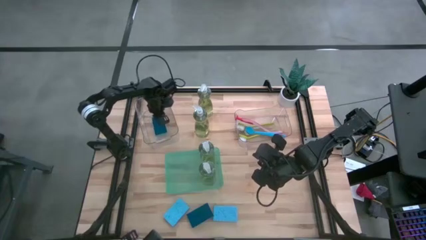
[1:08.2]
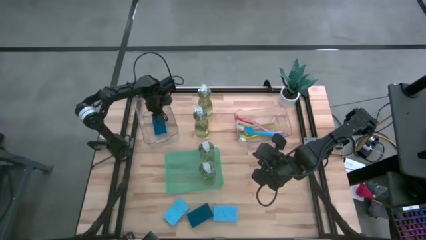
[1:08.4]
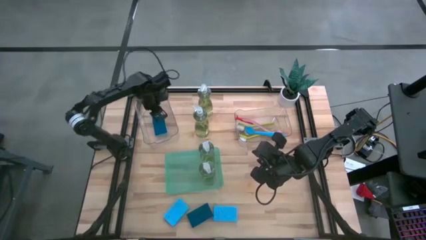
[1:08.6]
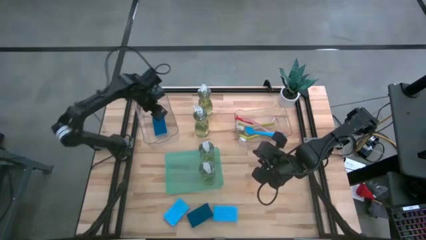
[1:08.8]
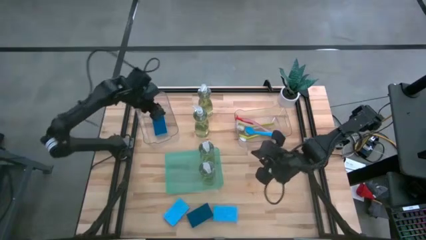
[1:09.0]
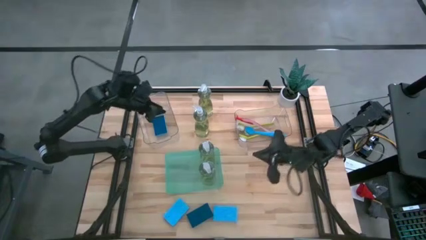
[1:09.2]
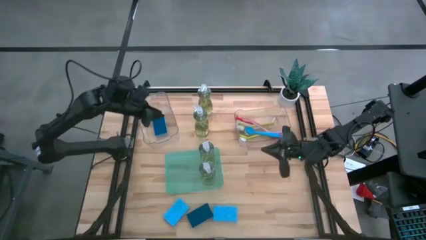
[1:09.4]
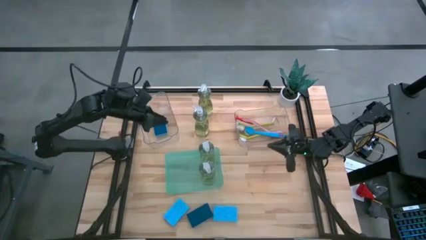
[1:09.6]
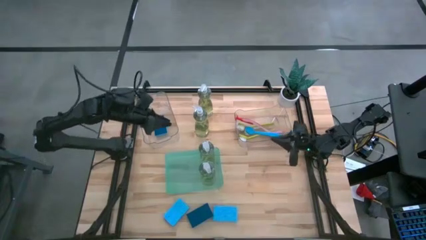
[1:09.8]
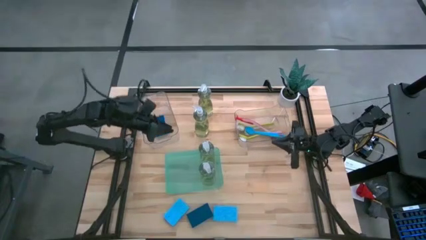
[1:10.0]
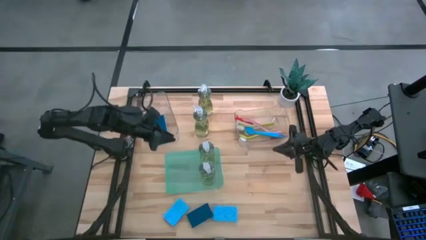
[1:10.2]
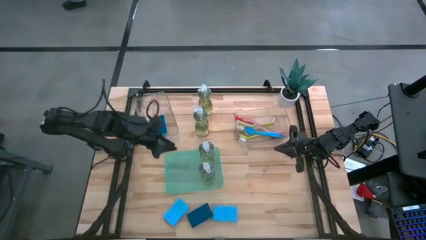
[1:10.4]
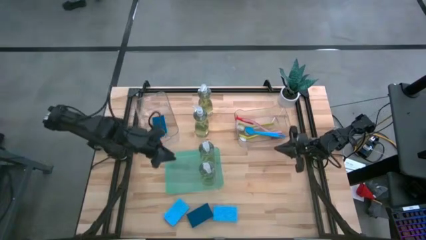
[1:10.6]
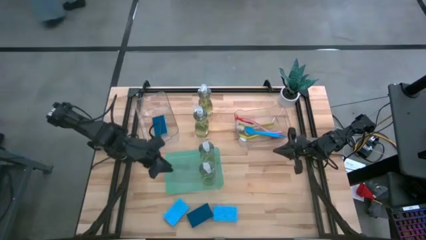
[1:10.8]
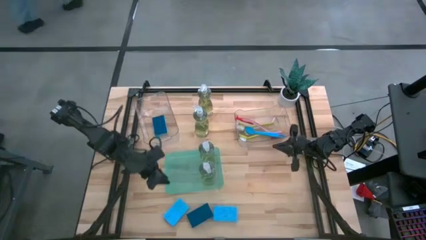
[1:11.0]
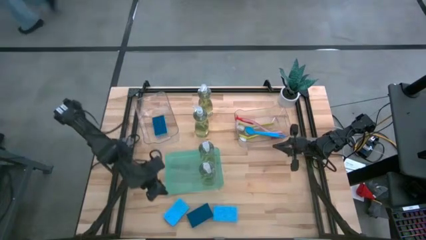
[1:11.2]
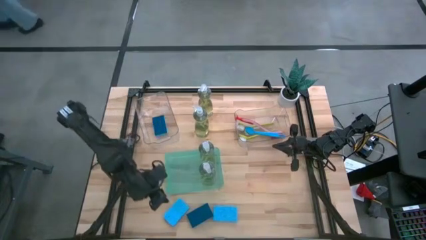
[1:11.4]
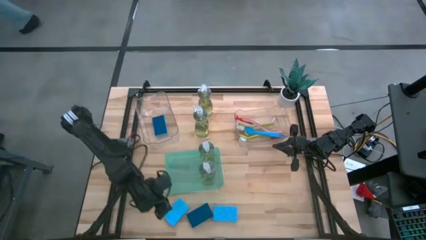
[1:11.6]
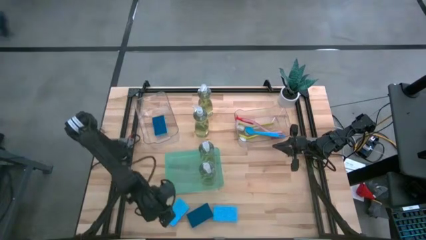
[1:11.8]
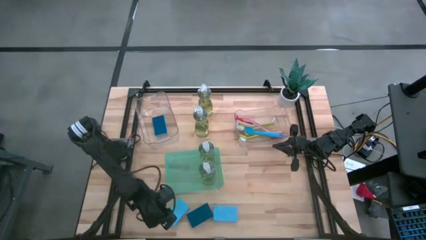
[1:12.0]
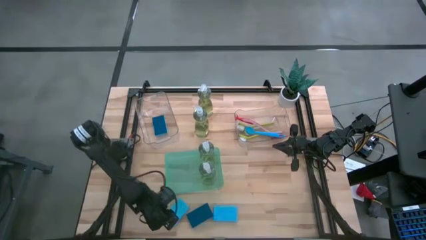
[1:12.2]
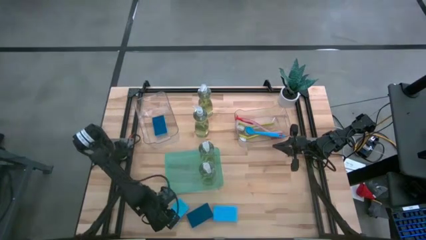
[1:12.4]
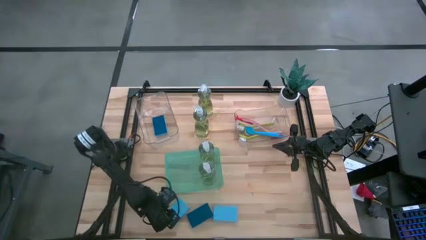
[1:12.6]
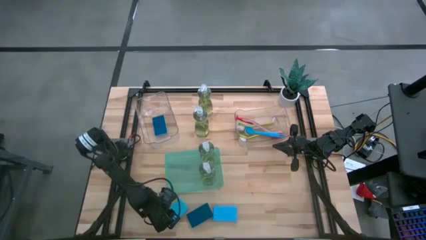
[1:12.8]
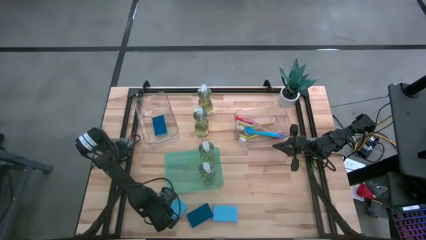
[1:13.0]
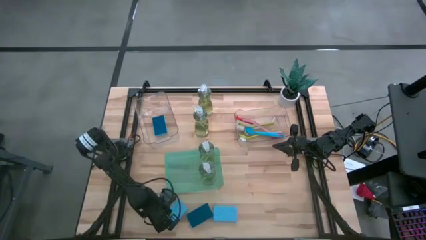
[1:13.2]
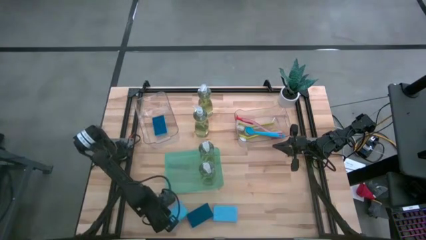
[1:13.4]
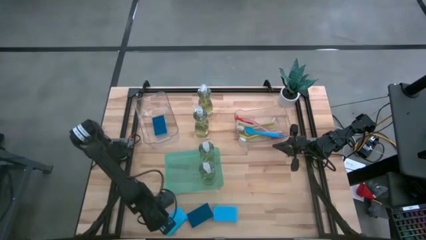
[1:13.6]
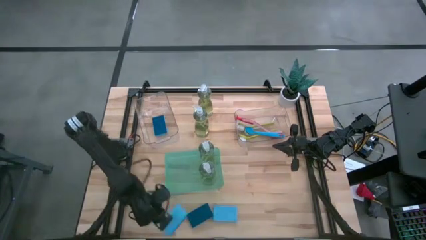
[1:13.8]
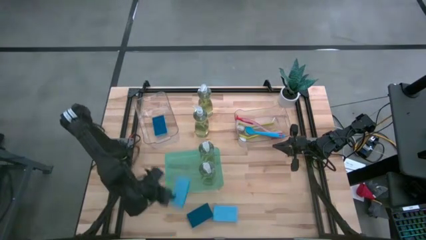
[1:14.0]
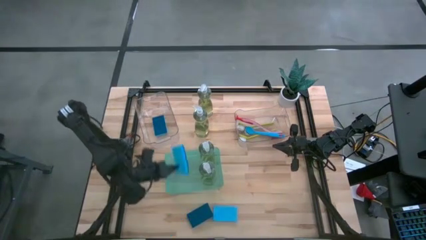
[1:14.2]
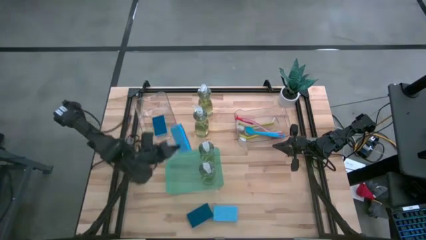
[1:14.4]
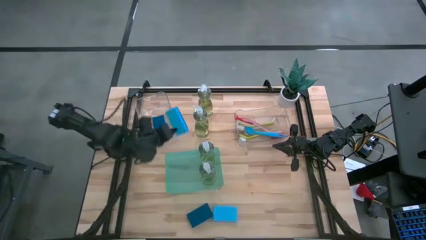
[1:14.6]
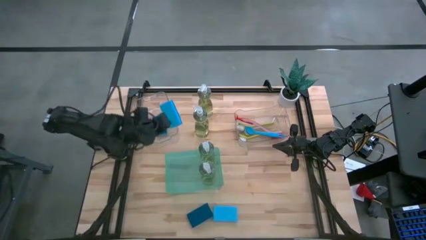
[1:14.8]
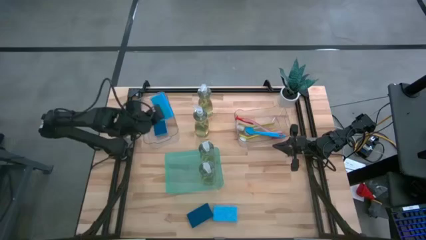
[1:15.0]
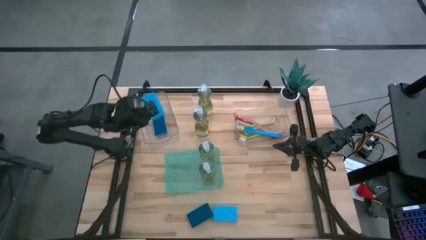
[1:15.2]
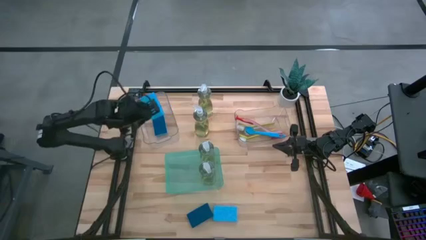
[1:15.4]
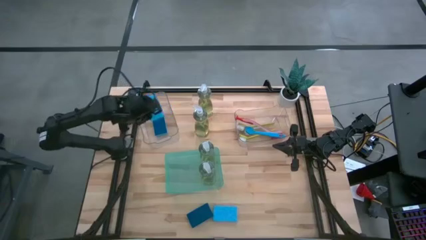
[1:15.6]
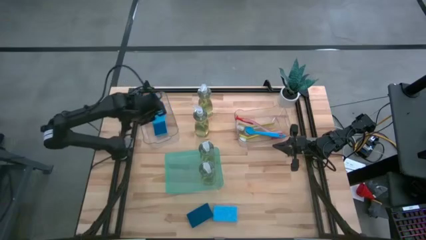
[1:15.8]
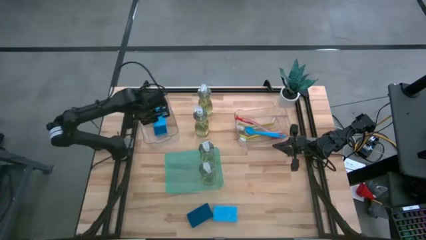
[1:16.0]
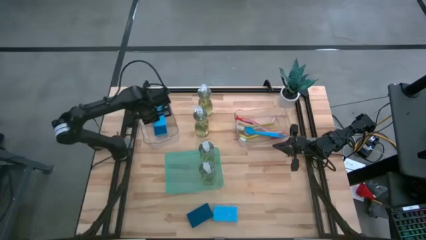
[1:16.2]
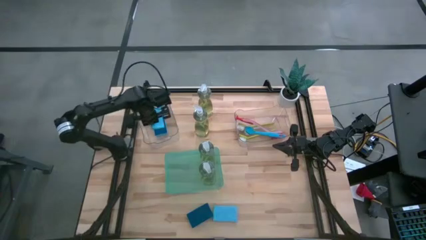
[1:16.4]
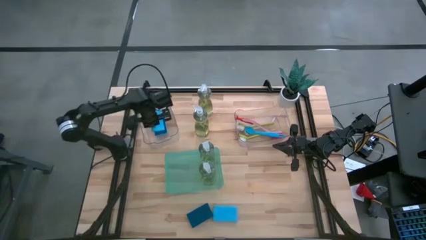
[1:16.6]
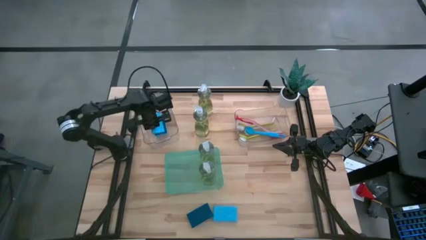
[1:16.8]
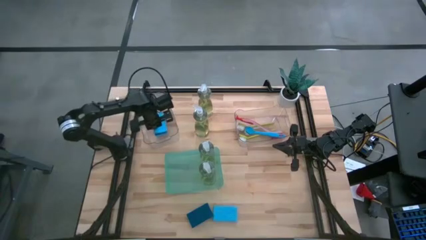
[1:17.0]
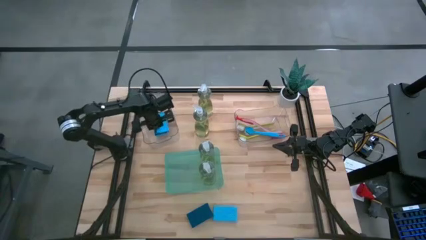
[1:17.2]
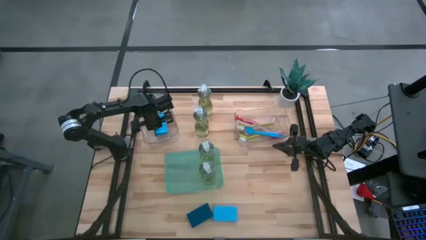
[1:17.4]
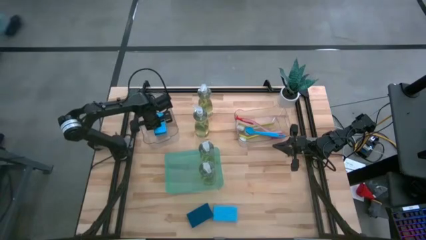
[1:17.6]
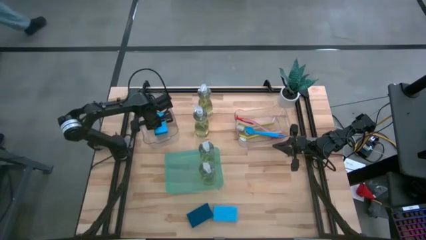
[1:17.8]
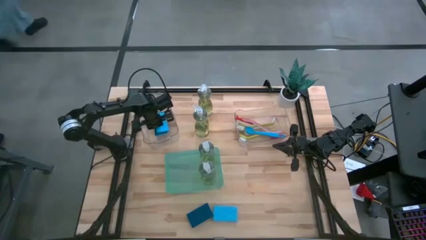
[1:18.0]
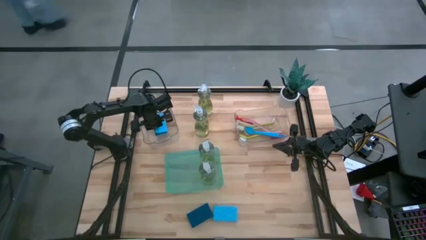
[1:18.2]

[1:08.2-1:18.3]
Task: Pick & Place Kitchen Sink Supplies
Put the blue sponge into the left transparent bin

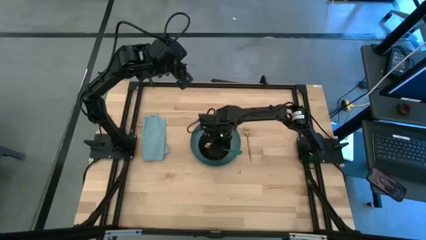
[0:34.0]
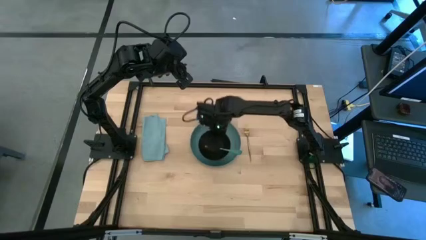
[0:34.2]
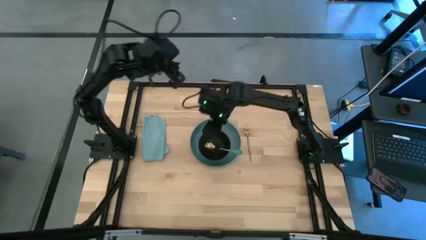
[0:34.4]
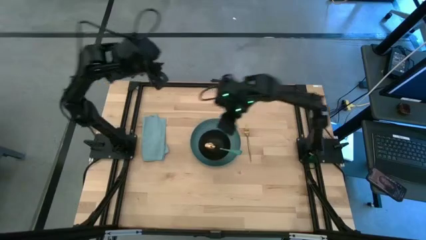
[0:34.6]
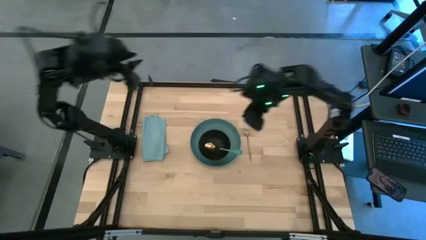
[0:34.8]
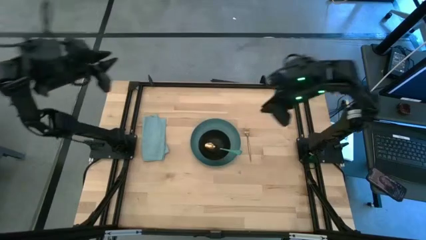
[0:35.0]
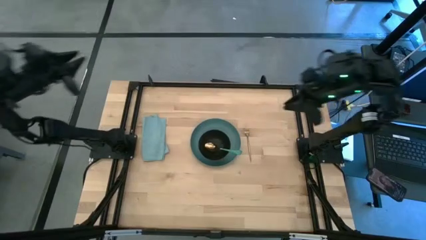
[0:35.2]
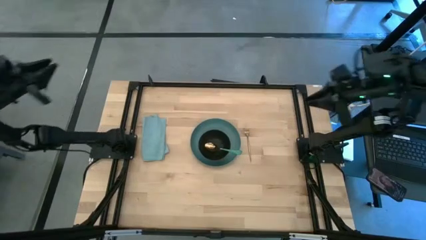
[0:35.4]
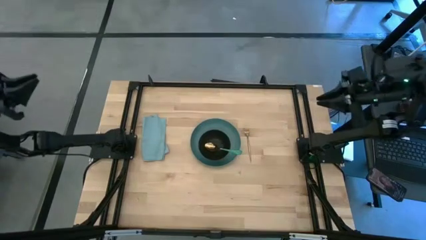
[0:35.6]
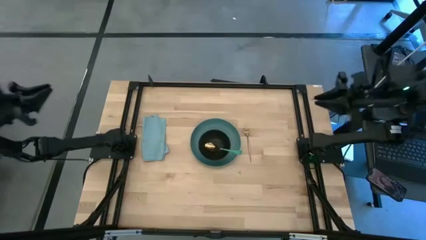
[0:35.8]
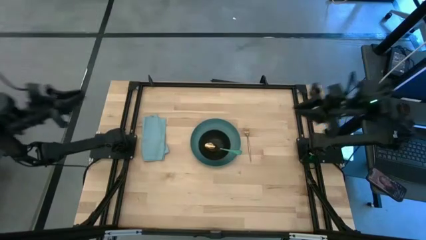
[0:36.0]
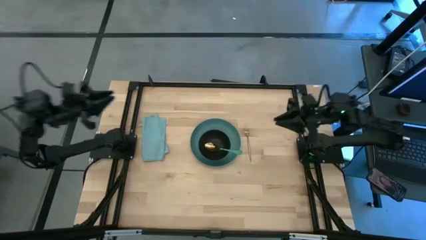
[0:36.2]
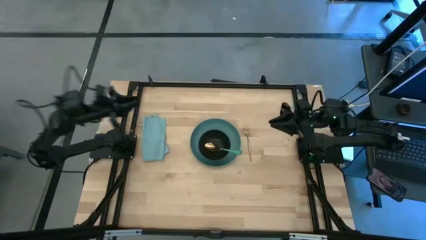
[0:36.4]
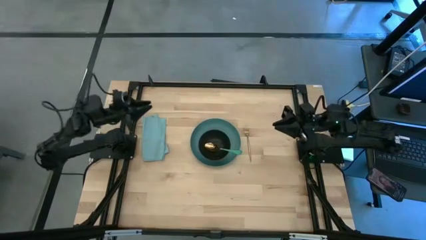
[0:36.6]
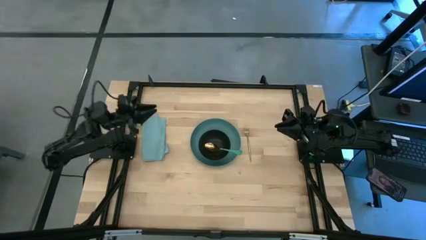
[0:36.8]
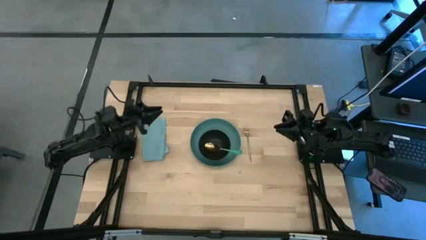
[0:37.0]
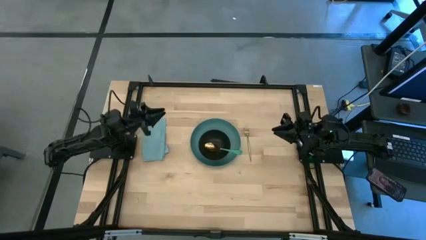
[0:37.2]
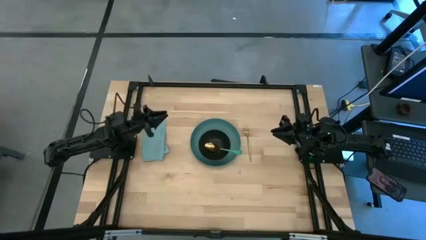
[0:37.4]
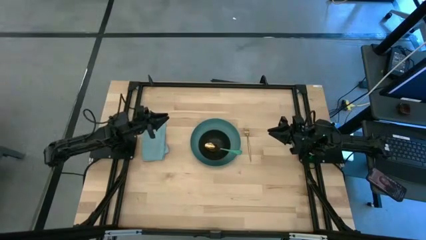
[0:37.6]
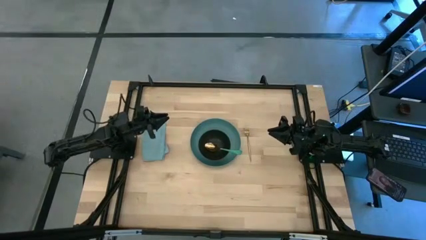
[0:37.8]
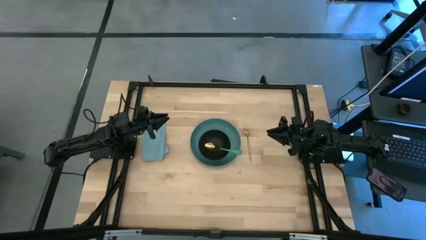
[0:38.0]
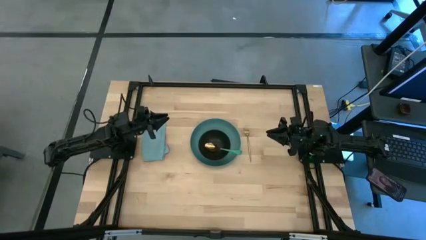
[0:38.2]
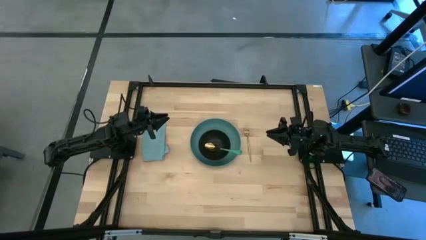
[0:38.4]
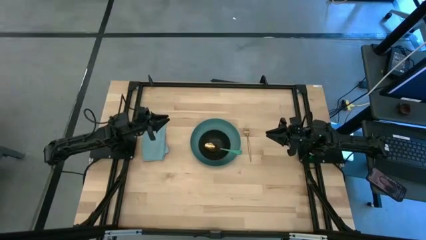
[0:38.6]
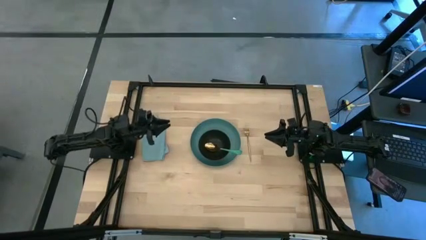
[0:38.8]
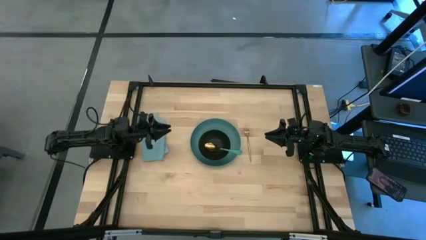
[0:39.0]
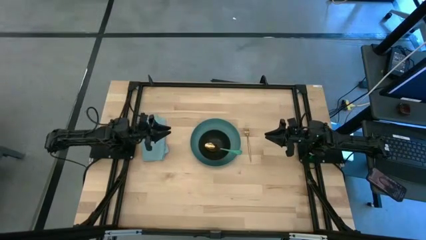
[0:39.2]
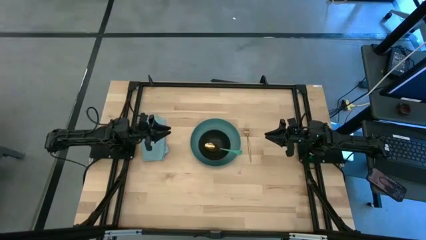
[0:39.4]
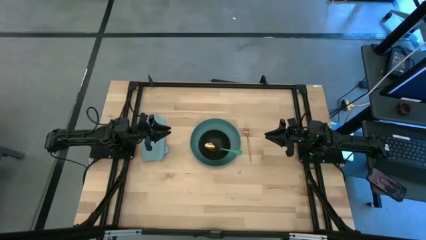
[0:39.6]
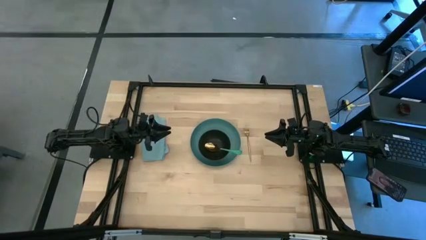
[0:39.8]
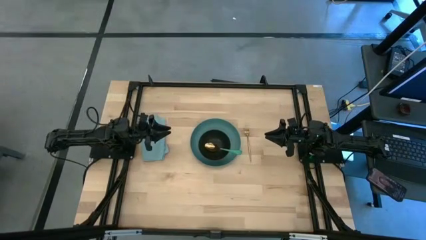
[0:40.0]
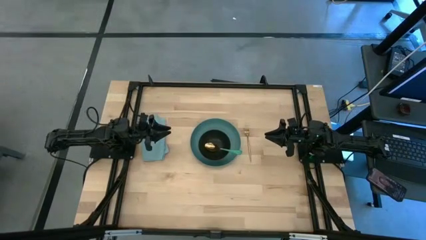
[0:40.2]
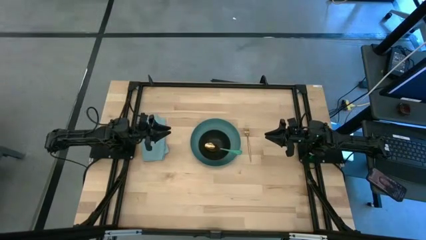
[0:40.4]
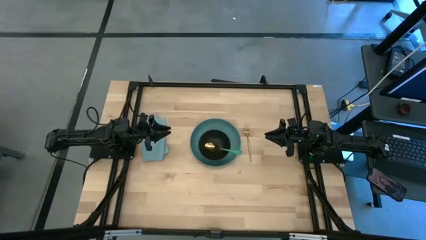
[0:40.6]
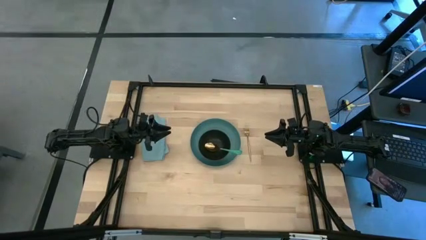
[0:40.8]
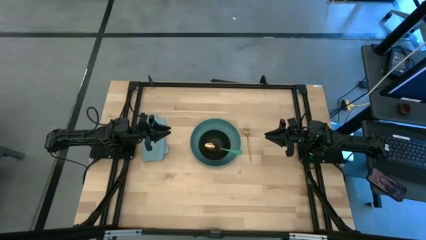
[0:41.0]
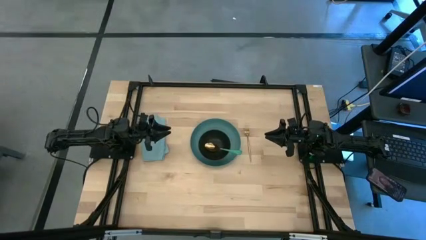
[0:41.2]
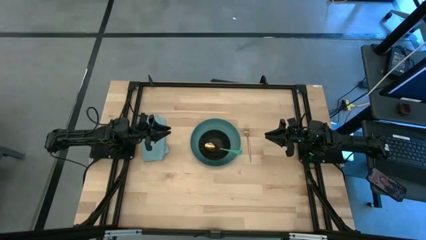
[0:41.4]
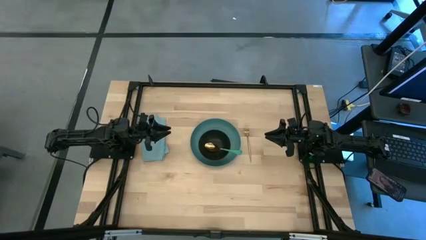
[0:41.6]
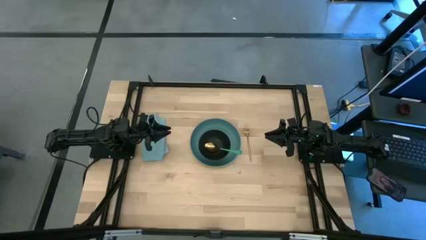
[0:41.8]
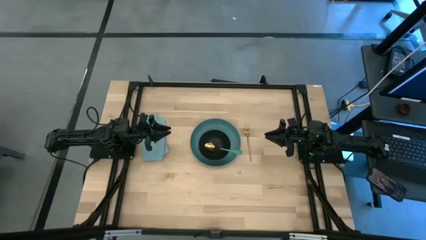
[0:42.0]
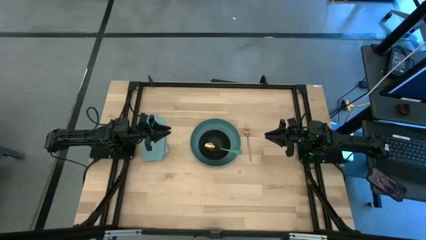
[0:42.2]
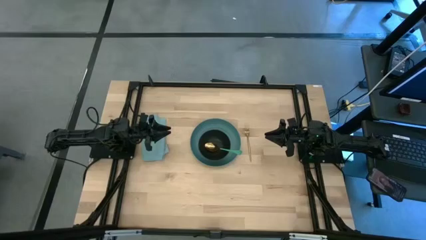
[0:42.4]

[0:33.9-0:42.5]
Task: Set table place
Return to Home Position
